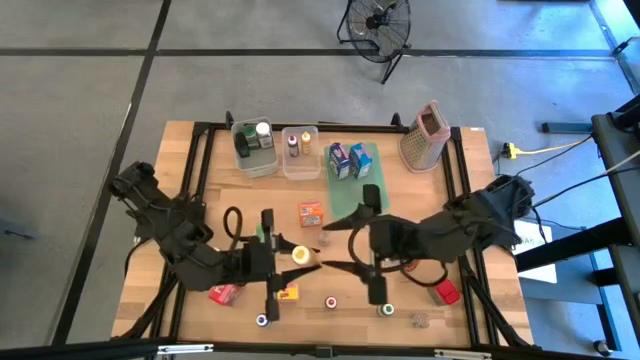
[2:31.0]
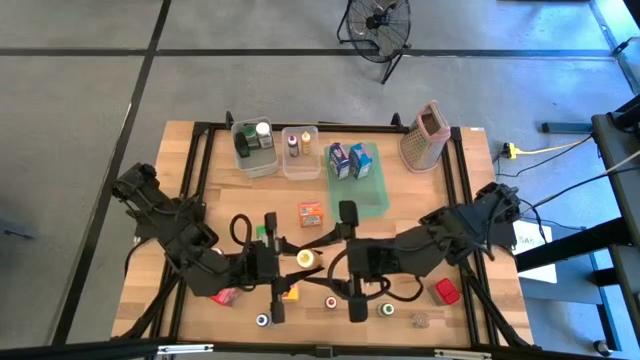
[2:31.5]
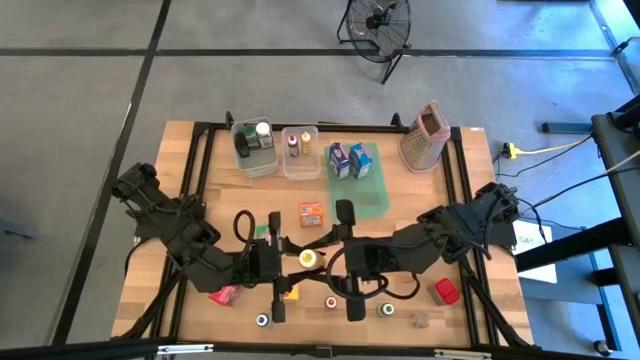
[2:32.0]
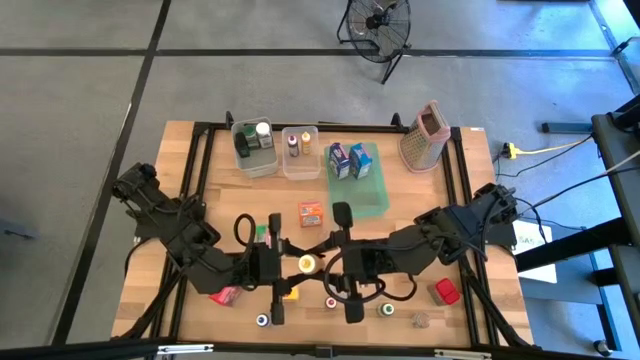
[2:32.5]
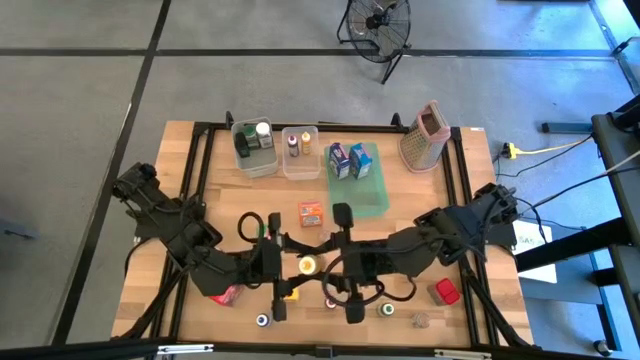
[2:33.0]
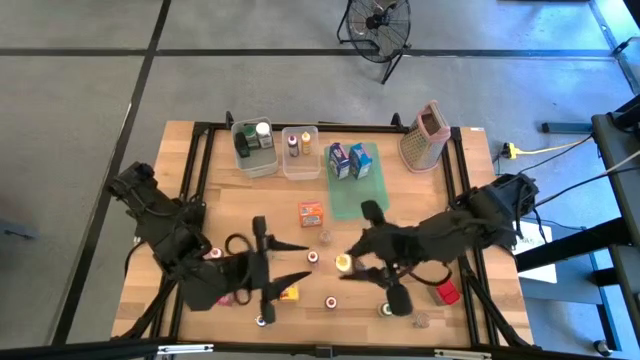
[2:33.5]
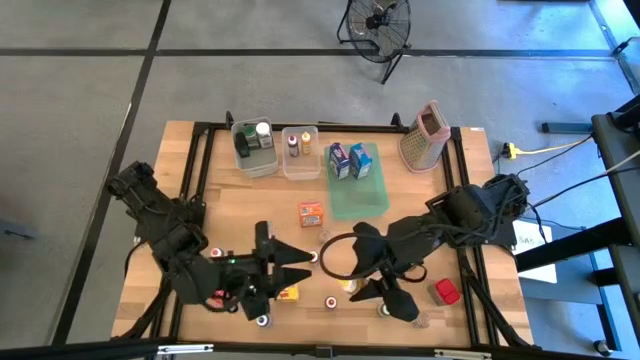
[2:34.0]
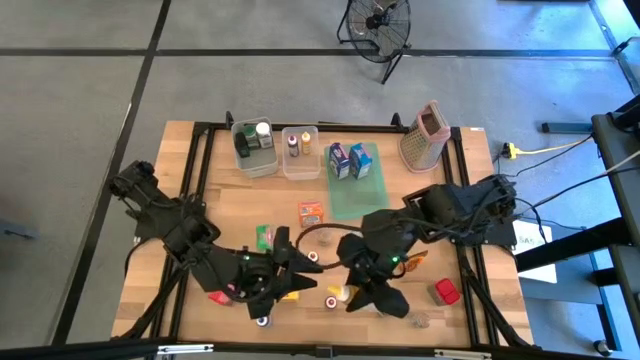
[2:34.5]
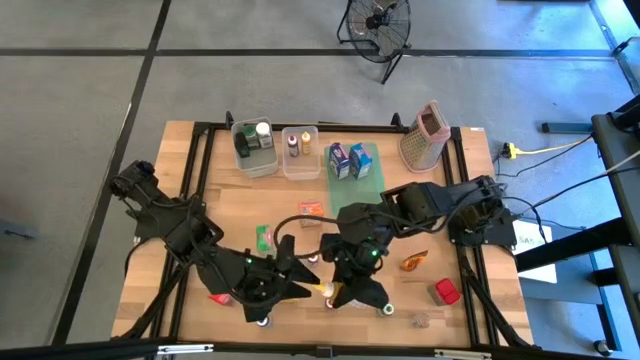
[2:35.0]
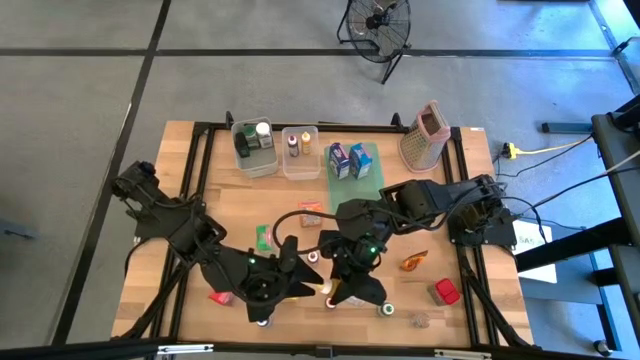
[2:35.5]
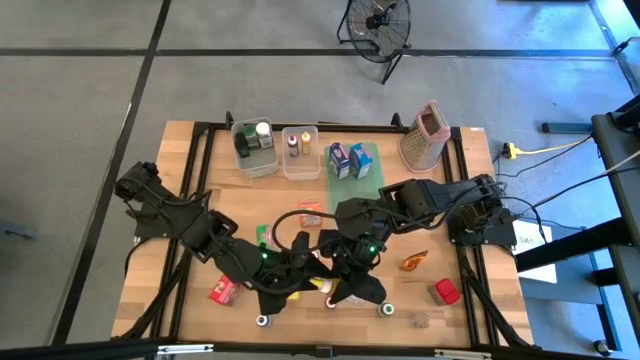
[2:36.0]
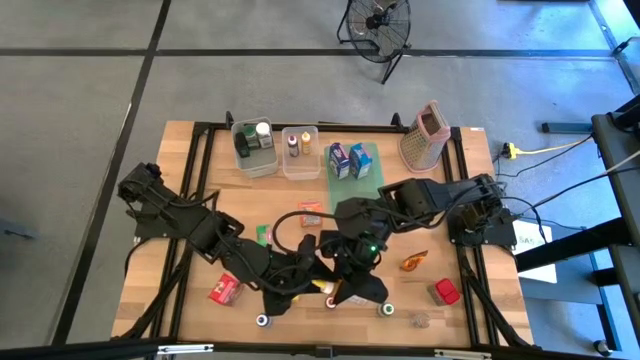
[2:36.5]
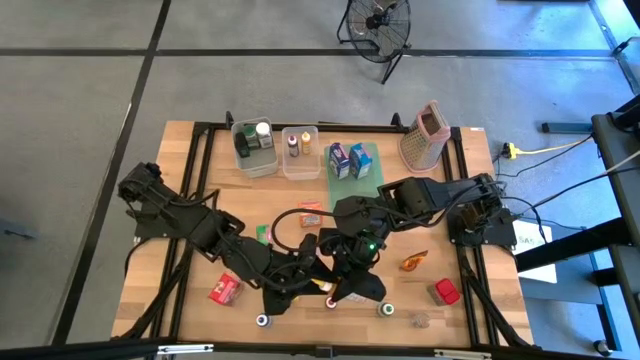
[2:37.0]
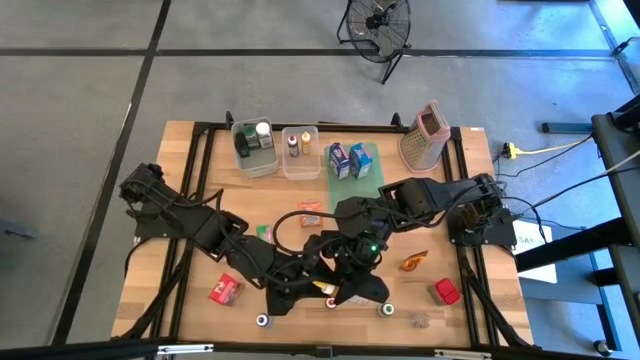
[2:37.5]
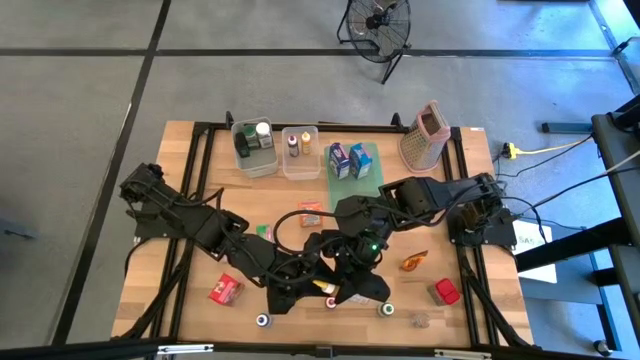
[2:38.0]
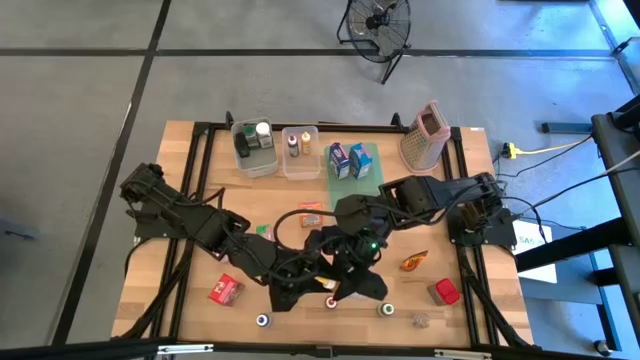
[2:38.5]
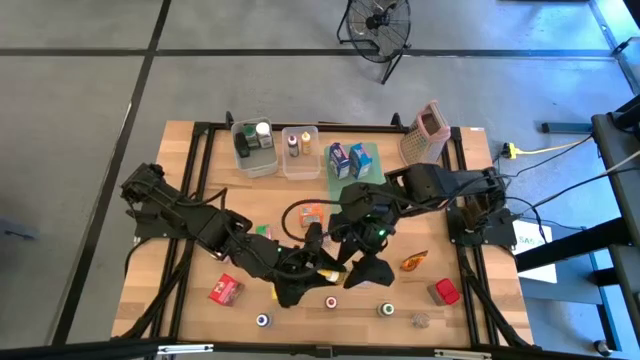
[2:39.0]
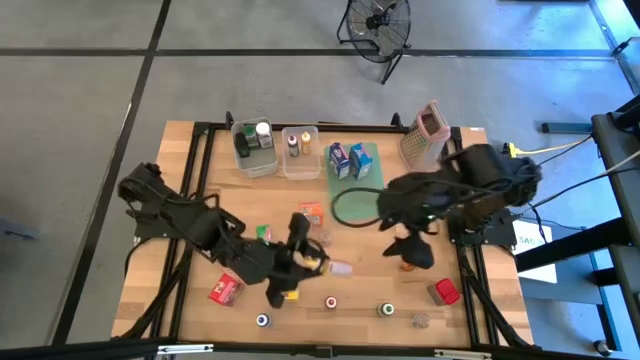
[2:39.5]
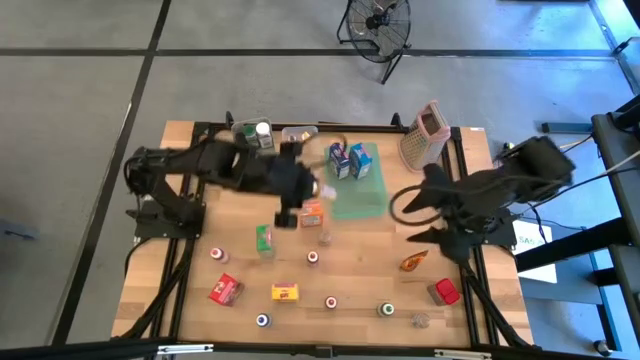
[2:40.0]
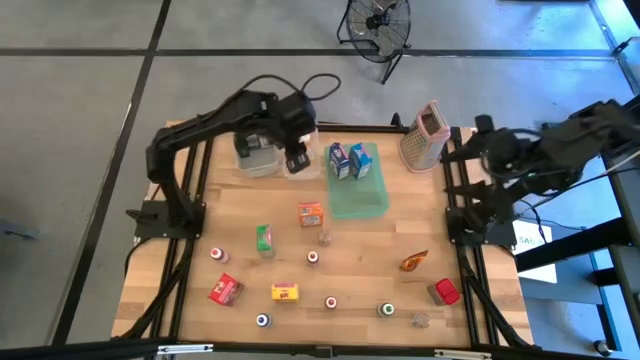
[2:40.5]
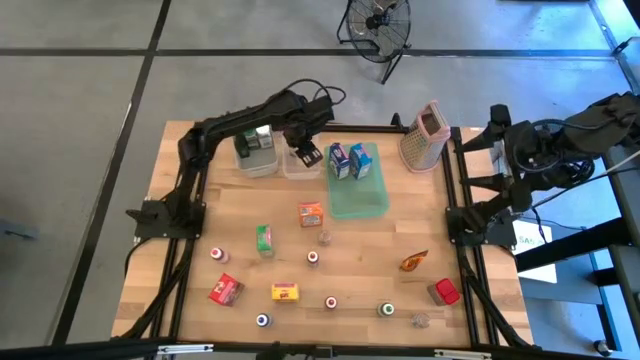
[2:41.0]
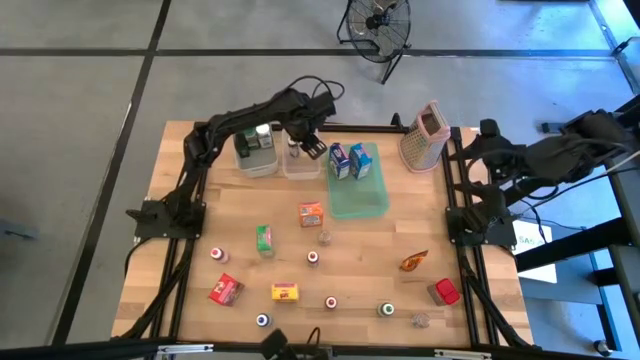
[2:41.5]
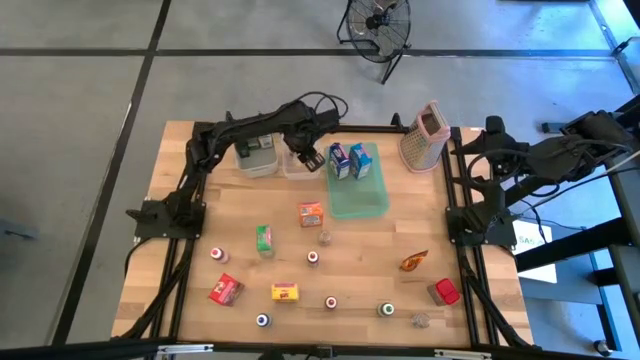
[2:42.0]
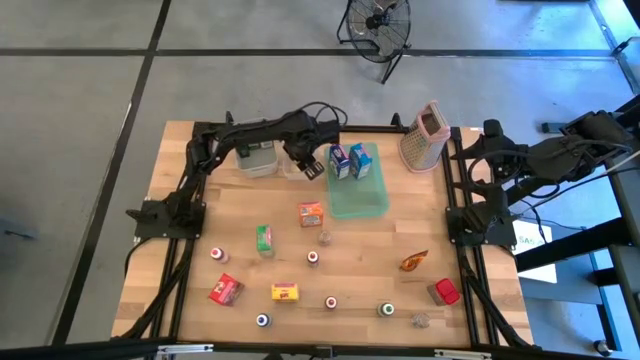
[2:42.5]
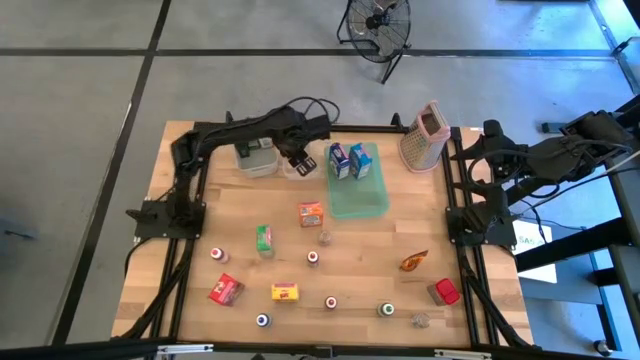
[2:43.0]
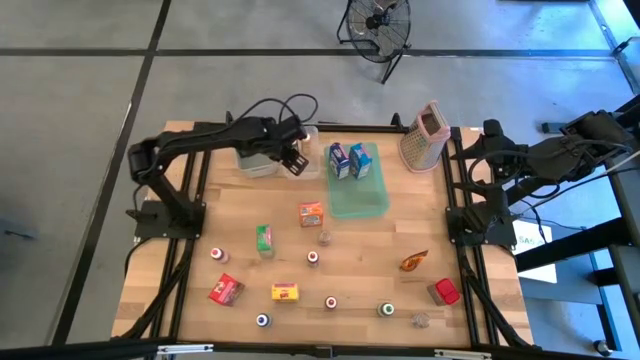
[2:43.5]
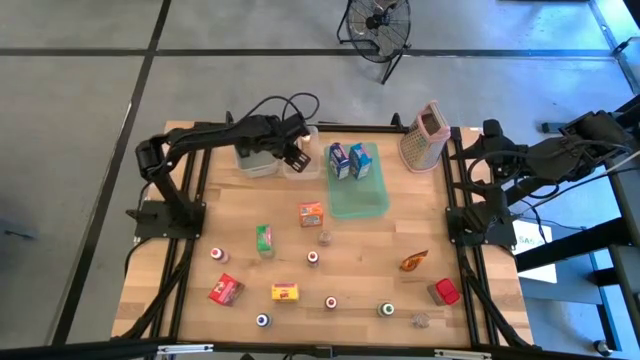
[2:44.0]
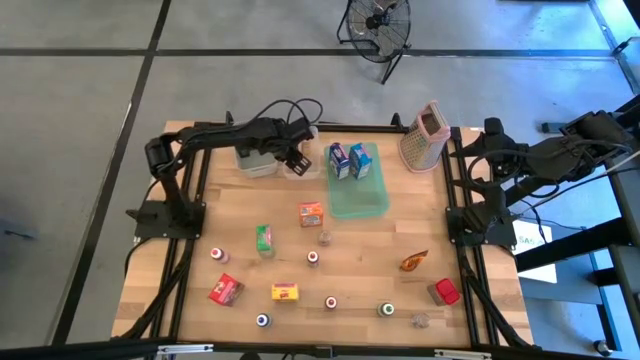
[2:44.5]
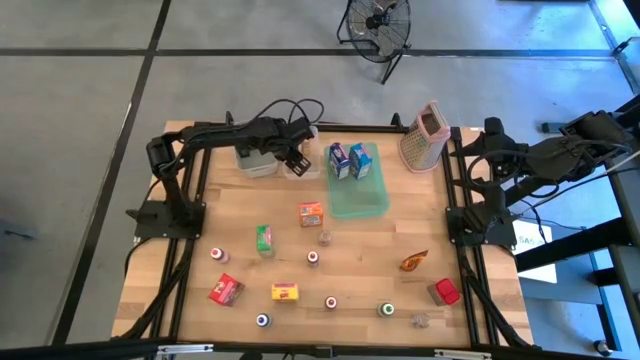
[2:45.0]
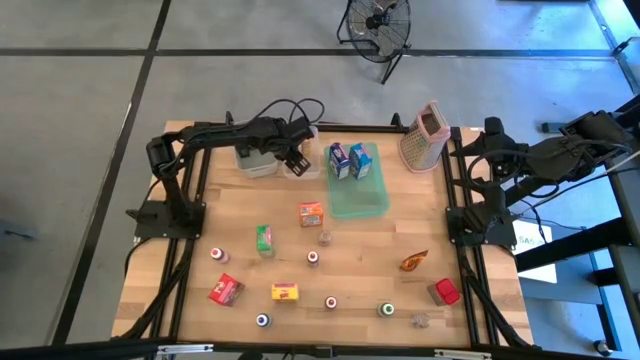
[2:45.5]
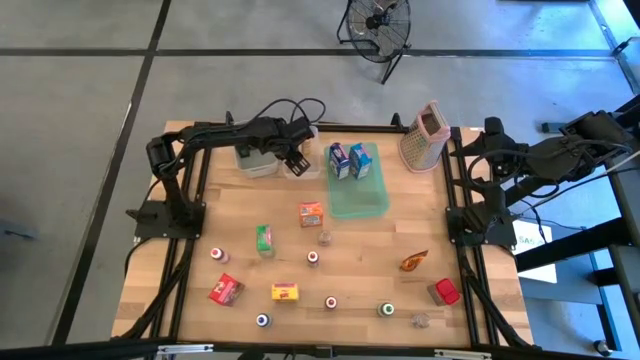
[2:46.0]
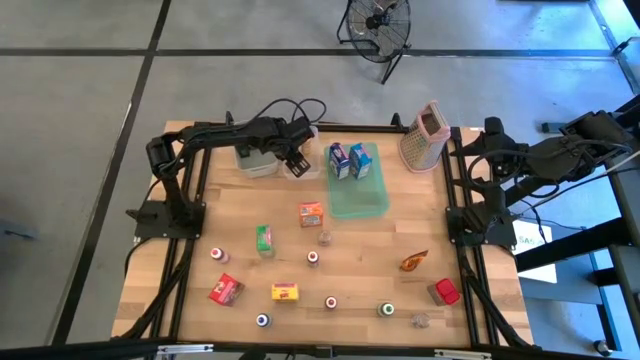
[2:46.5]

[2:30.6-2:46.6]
Task: Pick & Place Kitchen Items
Put the yellow food coloring bottle into the transparent bin

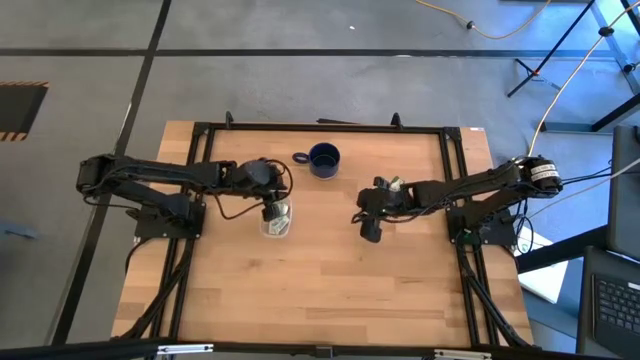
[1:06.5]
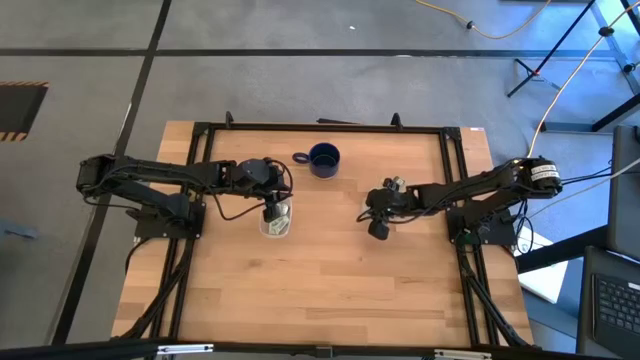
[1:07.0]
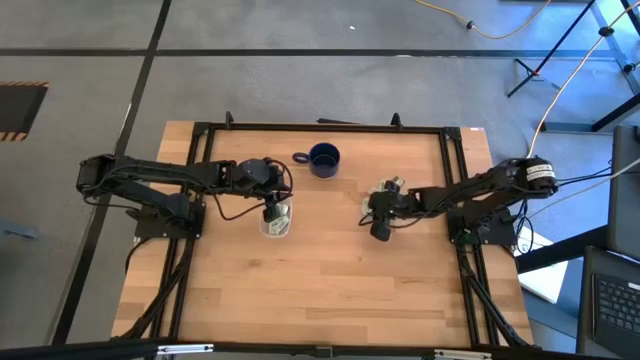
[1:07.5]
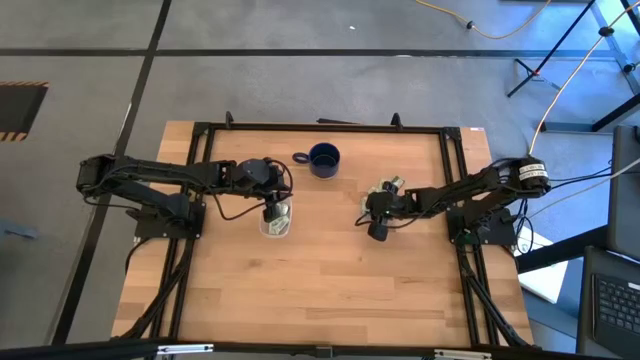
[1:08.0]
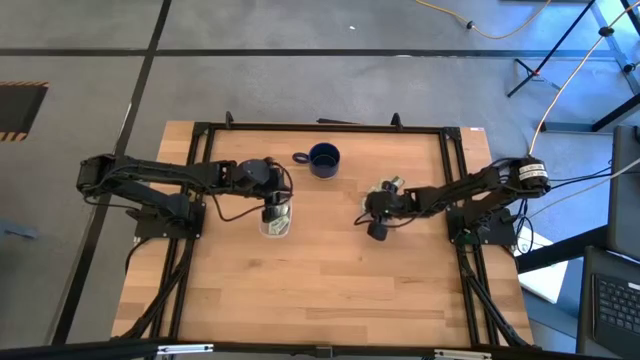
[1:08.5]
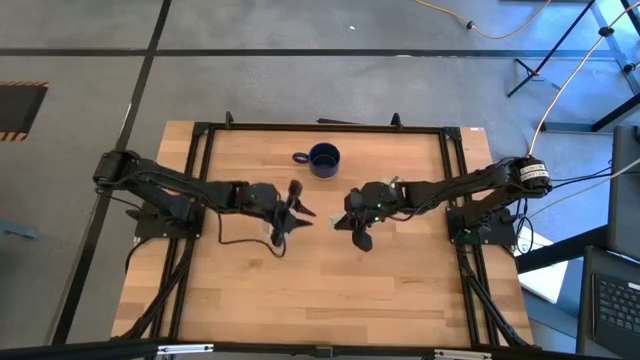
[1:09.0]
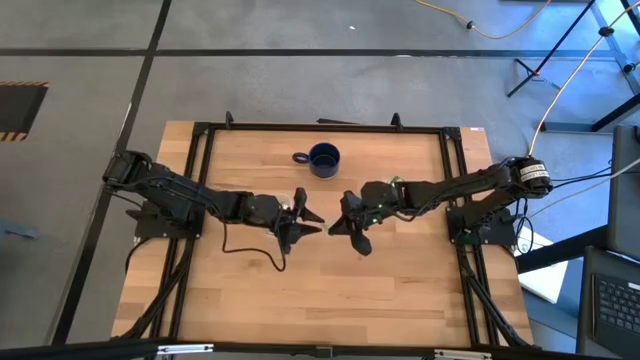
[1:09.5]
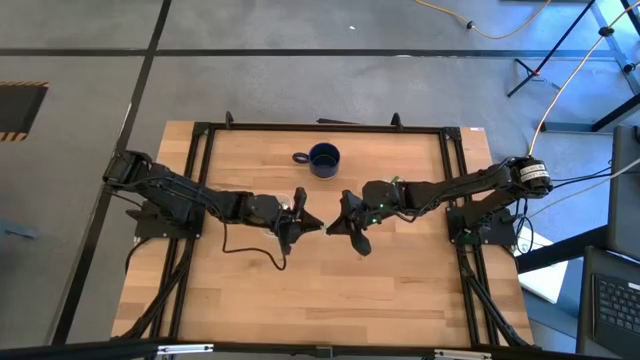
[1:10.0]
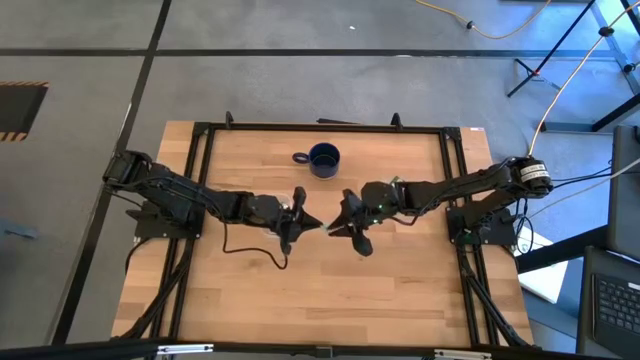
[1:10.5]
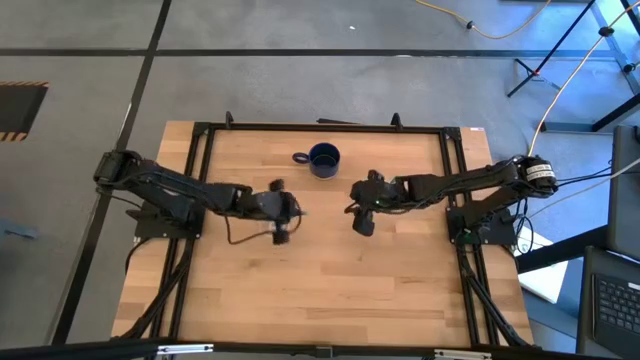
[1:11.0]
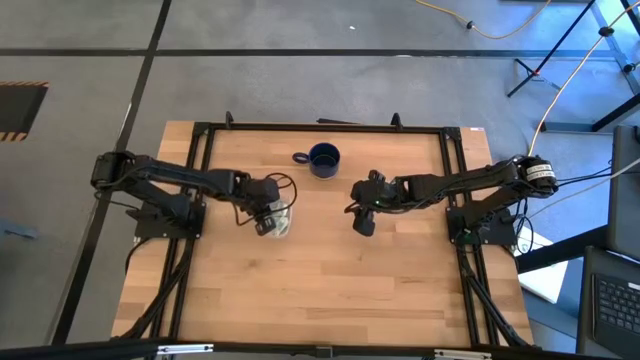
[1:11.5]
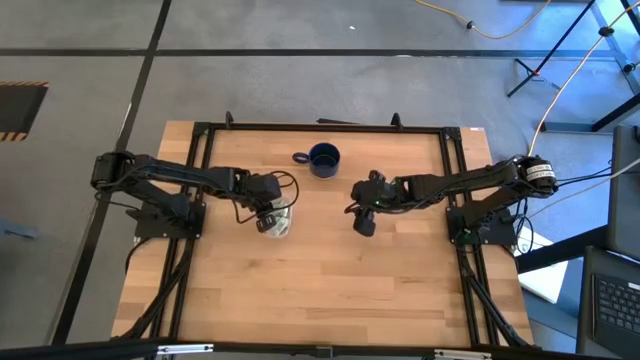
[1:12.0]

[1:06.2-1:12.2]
Task: Pick and place Stevia / Truvia into bins
Put the bottom white stevia packet into the transparent container
